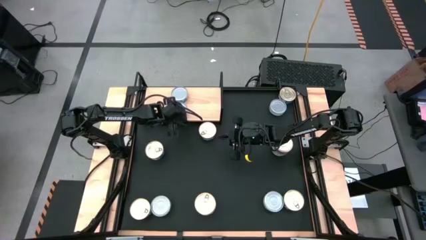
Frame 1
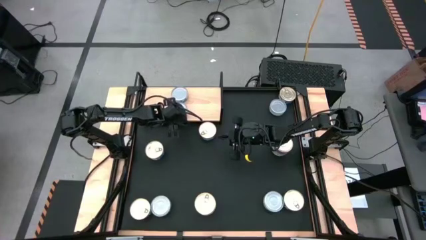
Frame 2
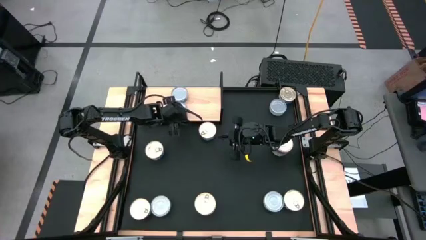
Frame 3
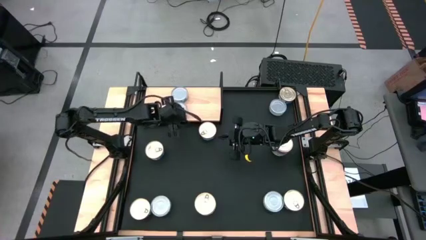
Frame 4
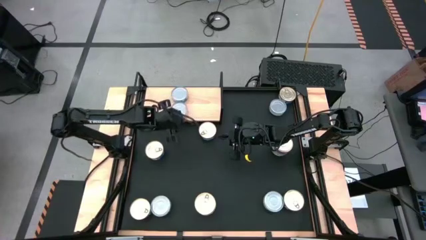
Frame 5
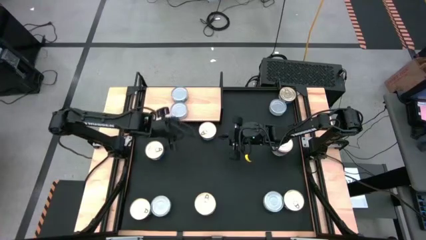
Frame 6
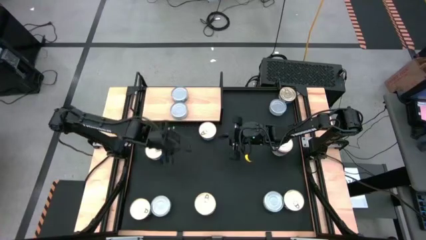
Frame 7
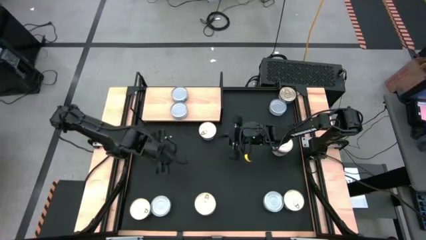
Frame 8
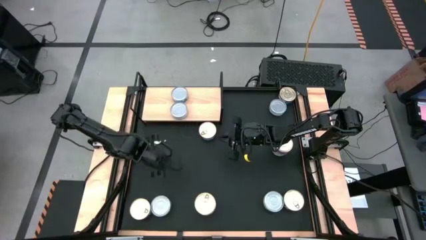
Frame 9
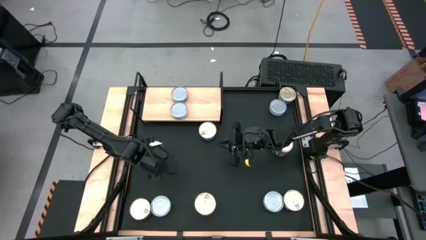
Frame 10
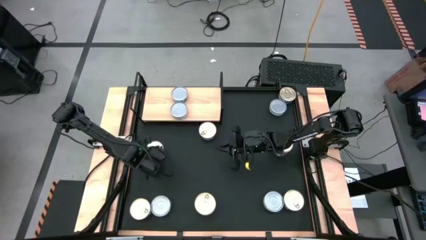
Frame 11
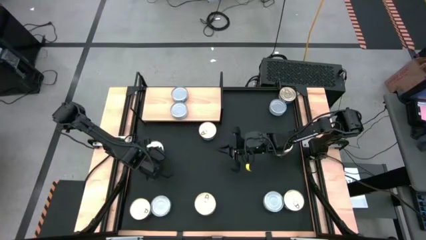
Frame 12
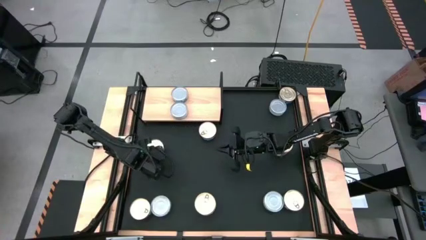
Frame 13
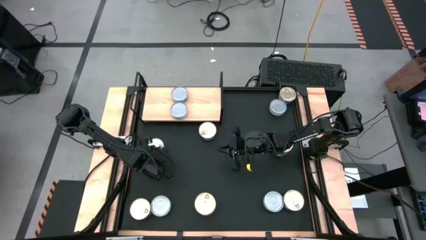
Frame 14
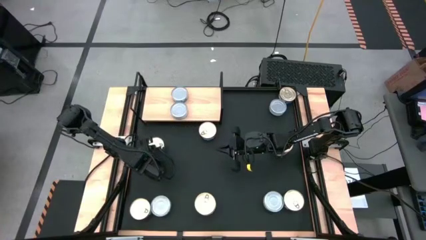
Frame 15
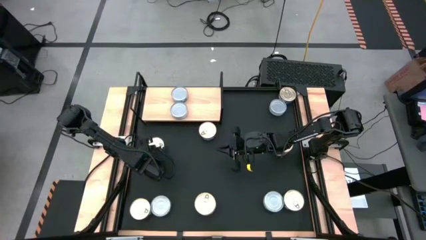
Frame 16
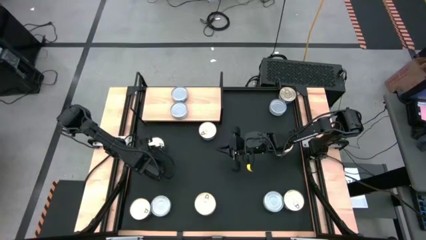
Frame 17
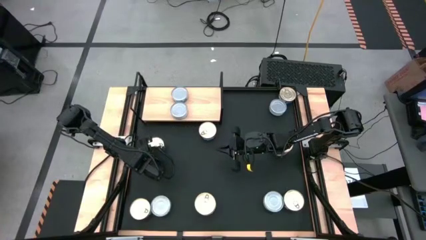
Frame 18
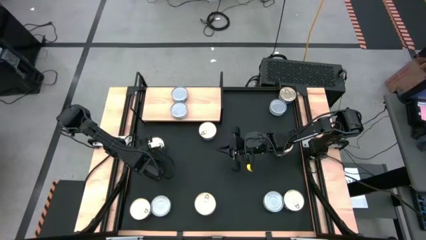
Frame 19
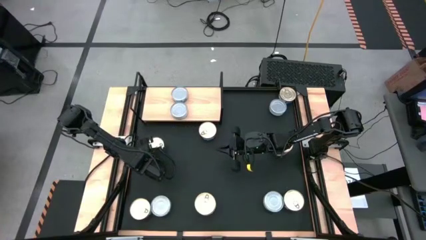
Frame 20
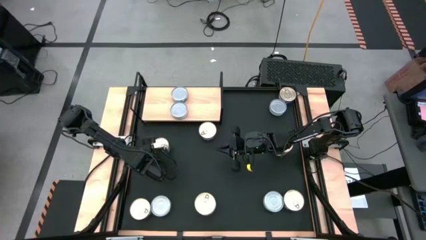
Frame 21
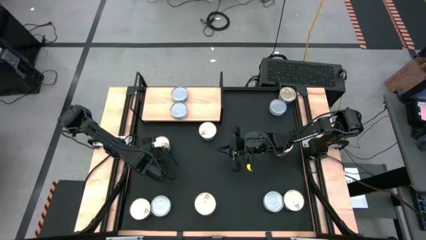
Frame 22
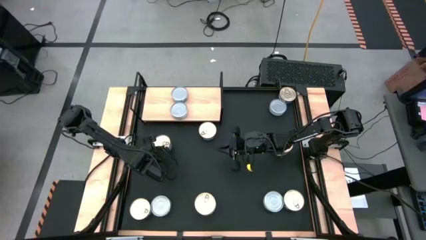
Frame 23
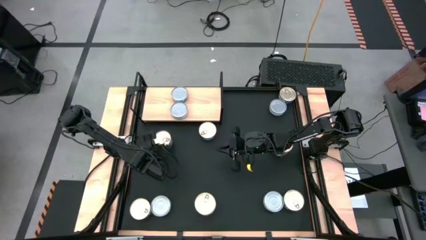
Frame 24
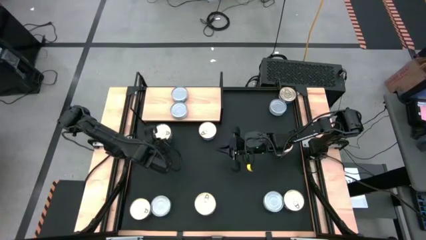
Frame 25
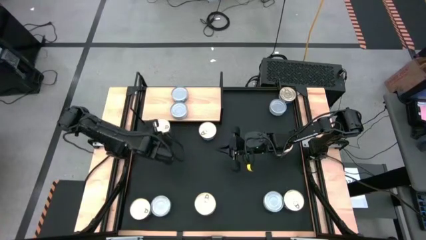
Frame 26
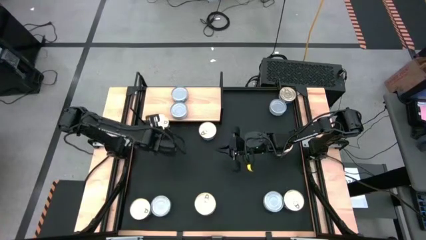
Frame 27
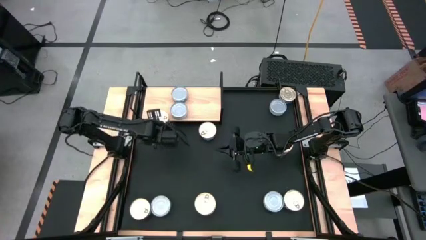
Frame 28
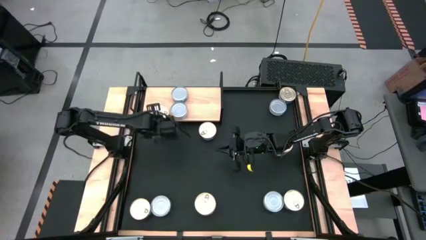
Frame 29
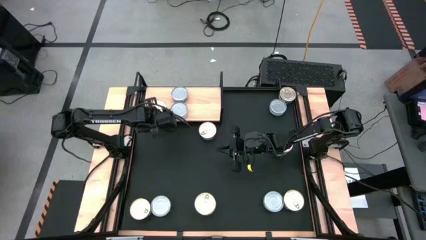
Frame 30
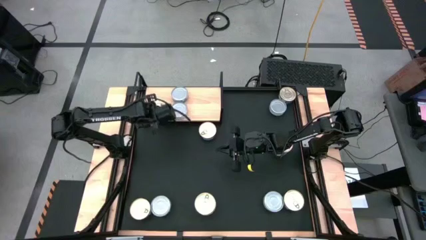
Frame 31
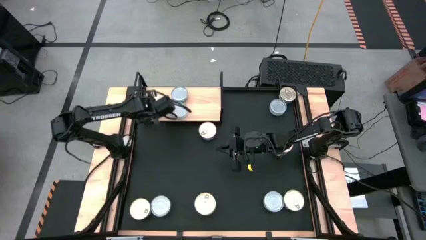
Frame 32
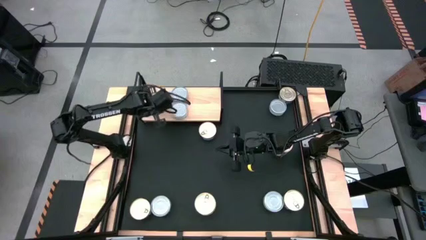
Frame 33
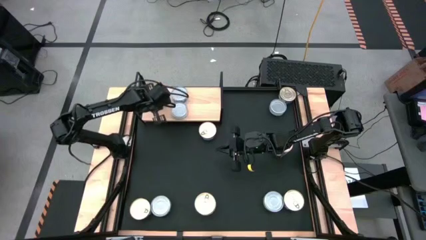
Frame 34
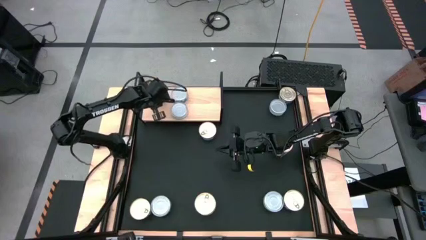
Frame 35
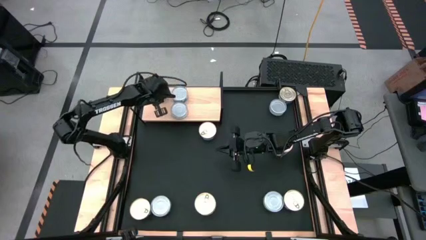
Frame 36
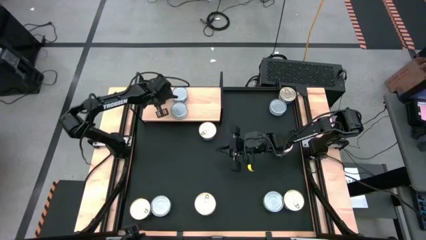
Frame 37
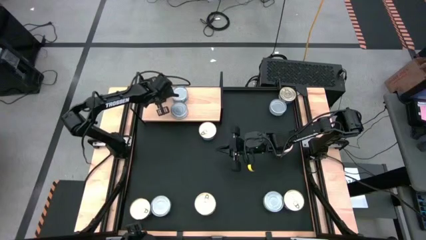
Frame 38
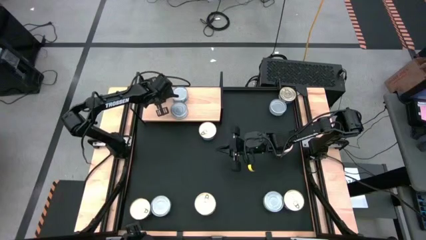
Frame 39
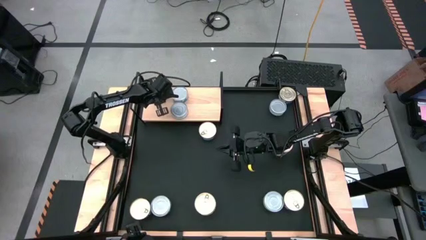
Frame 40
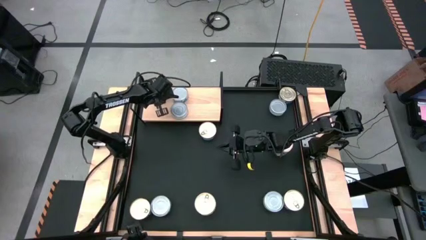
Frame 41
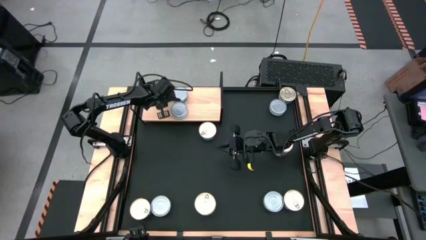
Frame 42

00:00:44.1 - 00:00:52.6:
Task: Stack canned seafood by type on shelf
Put the blue tuna can on the shelf

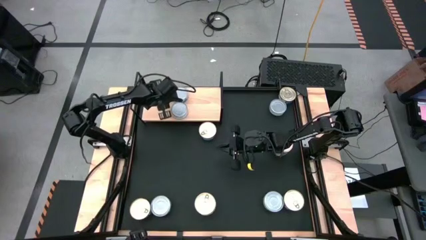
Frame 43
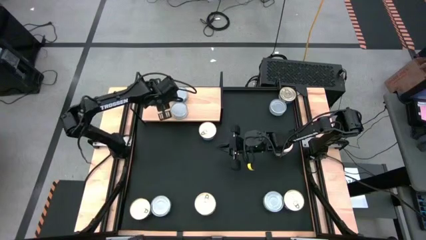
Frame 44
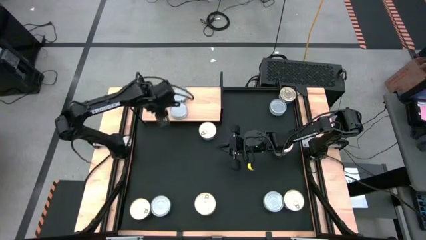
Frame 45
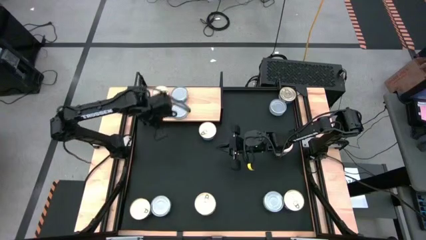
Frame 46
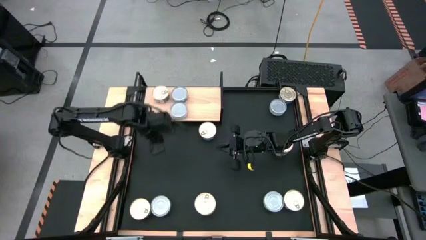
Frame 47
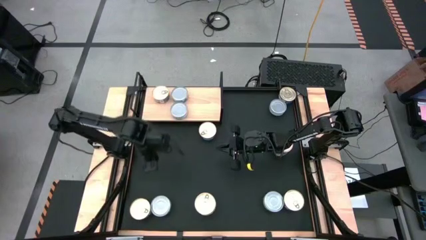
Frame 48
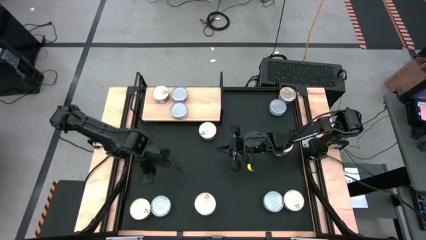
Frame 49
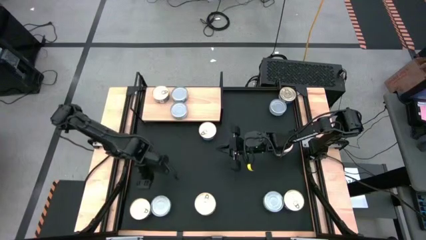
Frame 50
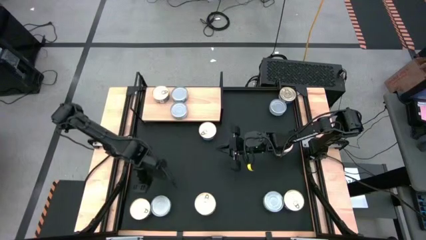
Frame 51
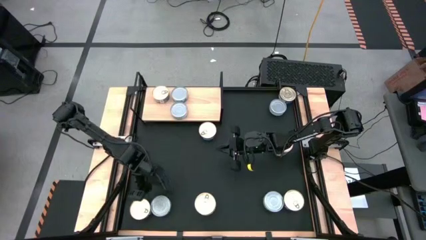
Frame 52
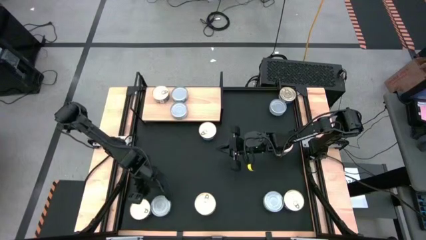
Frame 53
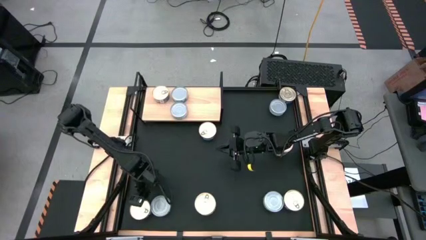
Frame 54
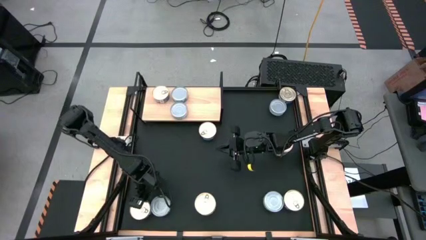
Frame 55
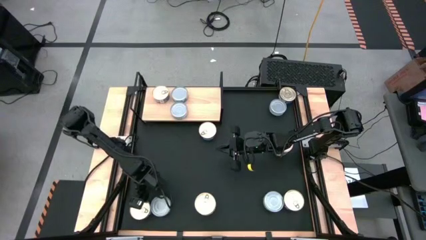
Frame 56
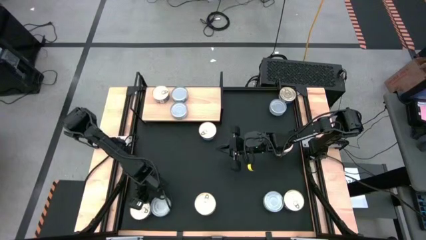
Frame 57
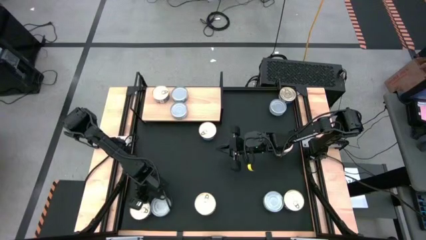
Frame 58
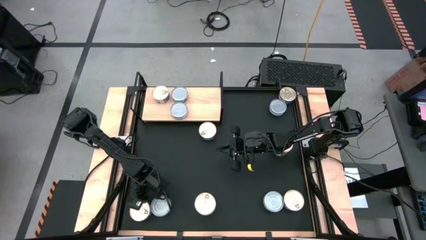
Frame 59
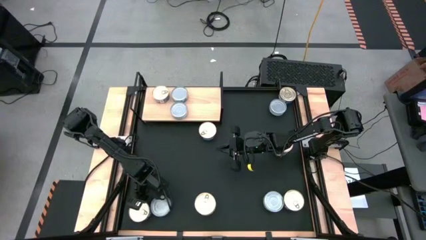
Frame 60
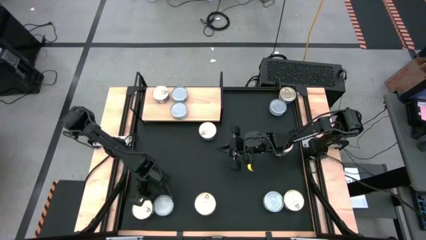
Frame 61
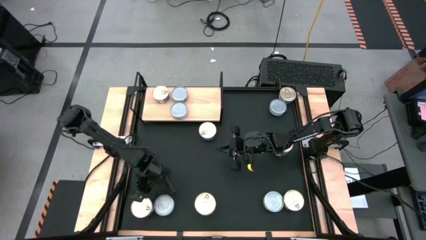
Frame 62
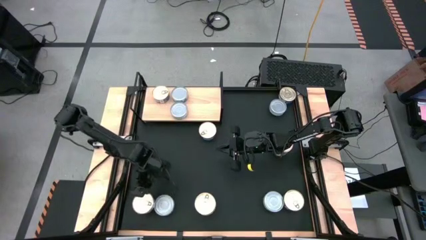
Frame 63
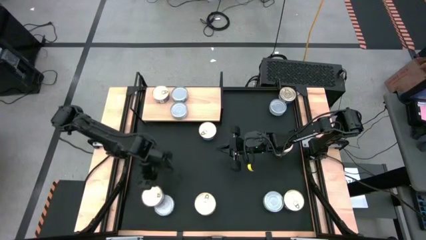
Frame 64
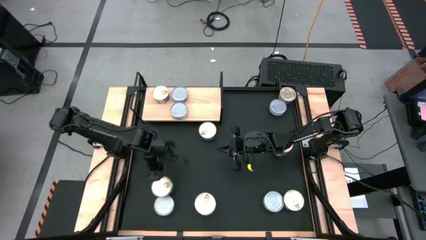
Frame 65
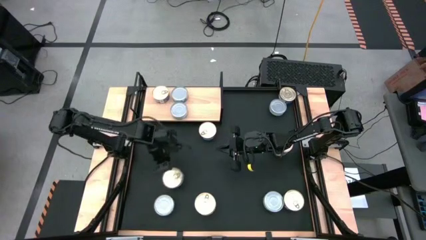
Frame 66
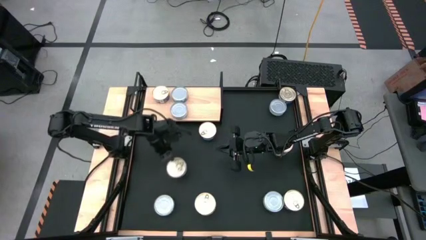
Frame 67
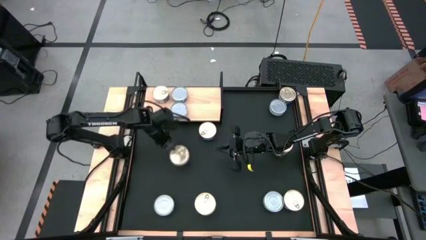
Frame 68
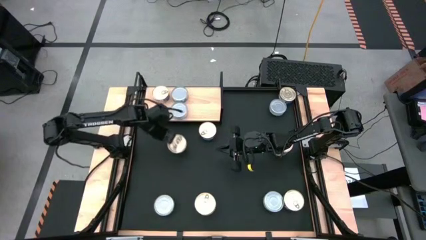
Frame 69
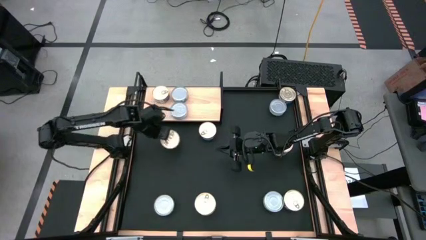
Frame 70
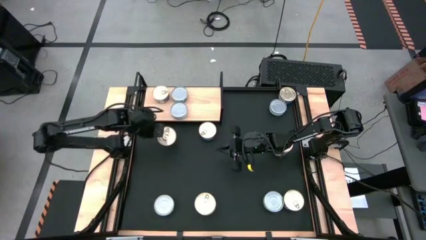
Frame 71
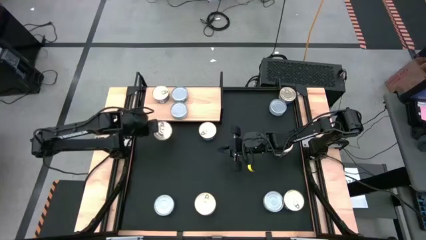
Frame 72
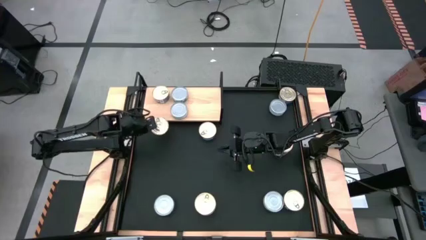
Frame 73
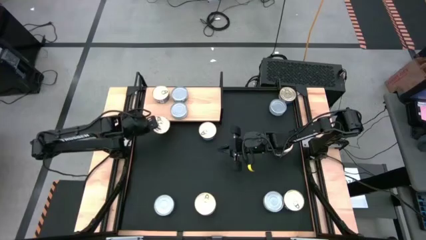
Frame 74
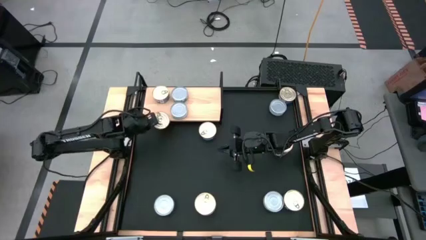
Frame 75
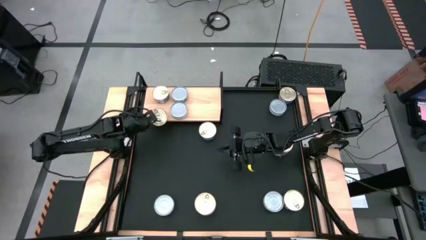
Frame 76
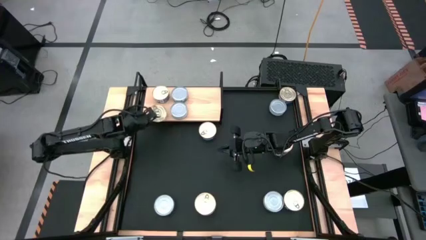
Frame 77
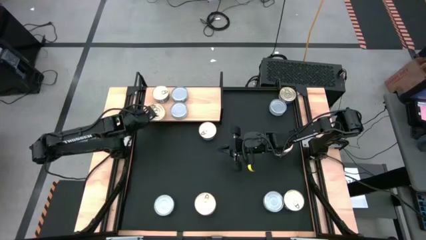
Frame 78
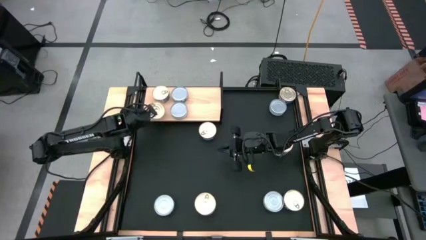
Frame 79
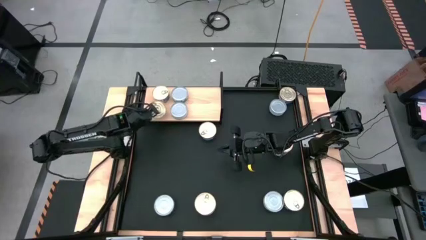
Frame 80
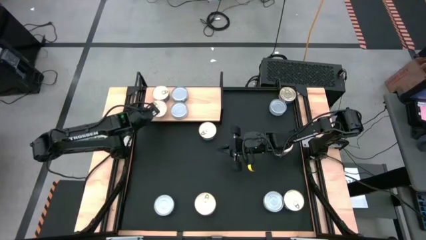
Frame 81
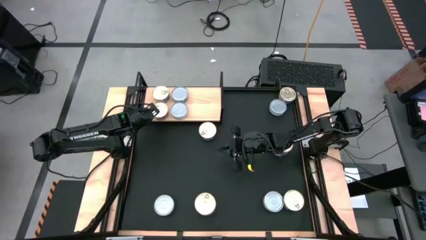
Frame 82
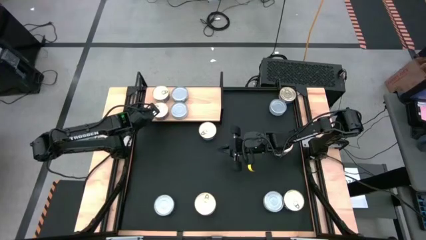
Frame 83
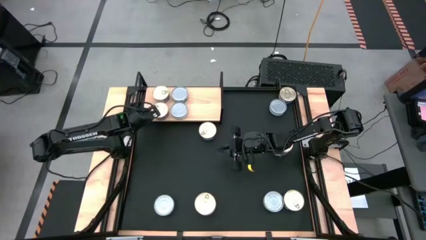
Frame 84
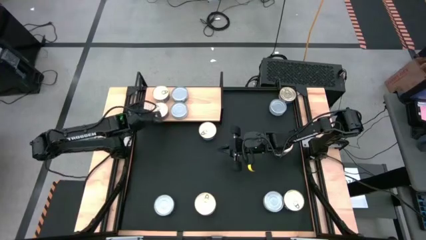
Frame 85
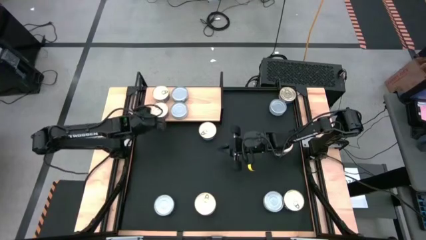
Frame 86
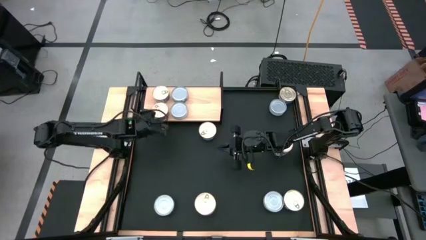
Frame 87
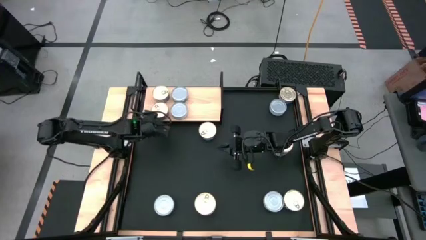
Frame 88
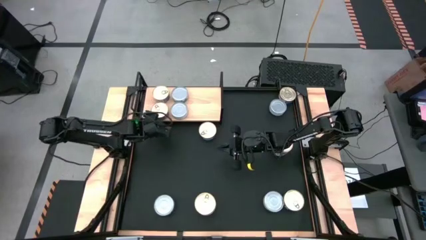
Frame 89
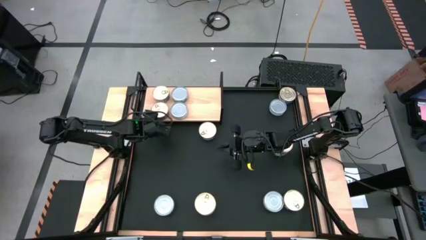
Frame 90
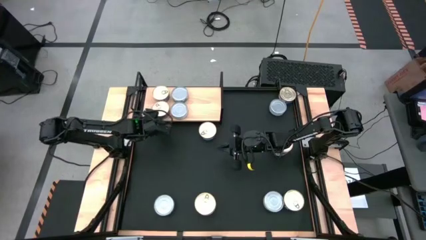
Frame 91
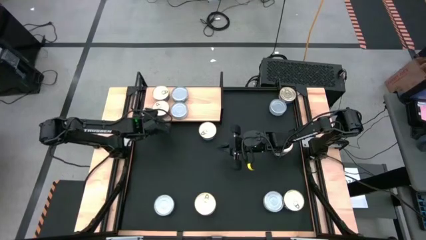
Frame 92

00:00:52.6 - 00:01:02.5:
Put the blue tuna can on the shelf
